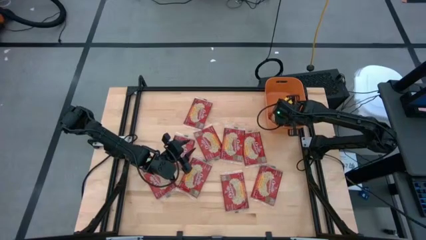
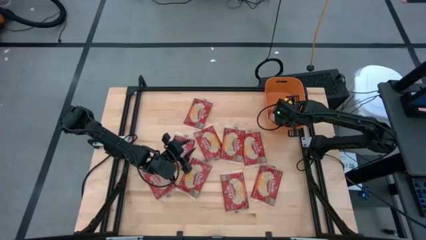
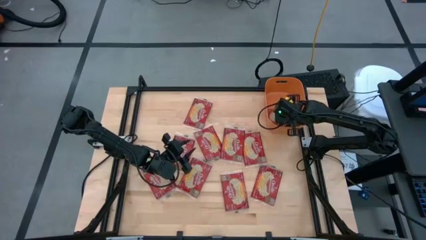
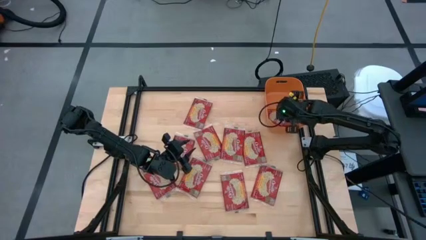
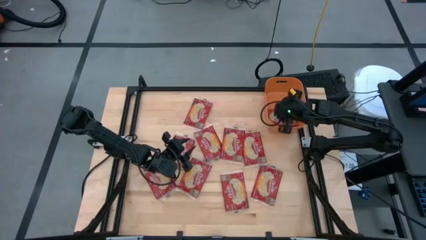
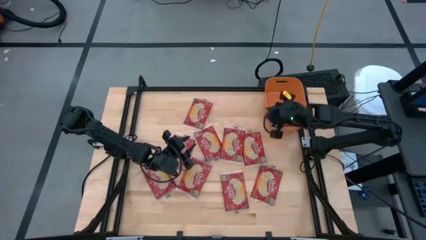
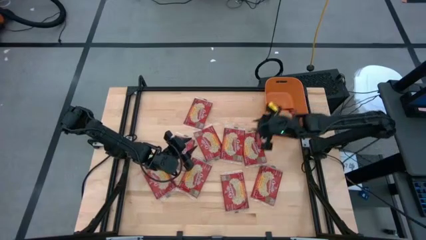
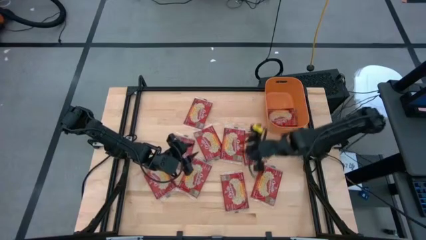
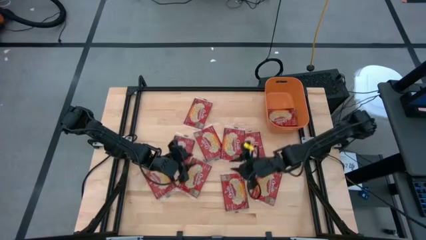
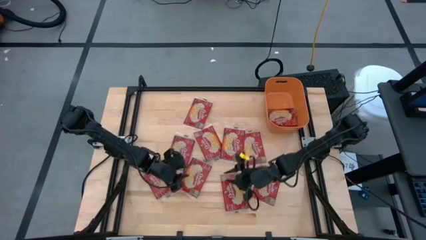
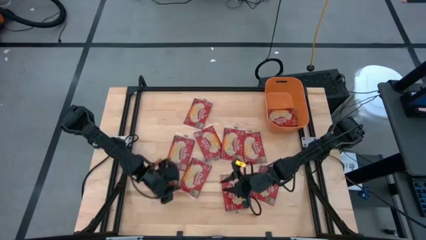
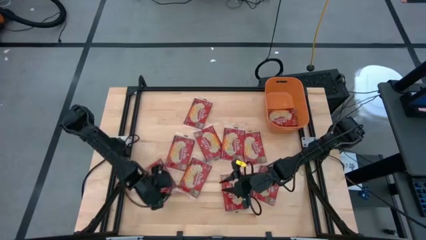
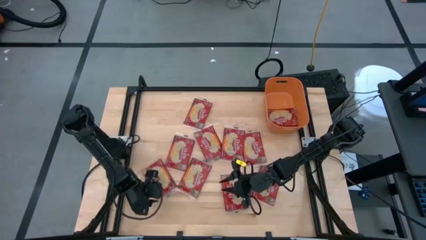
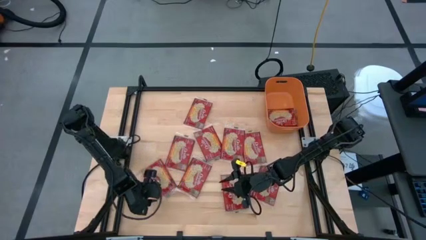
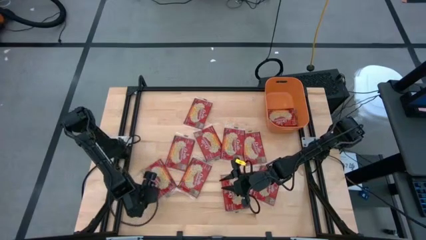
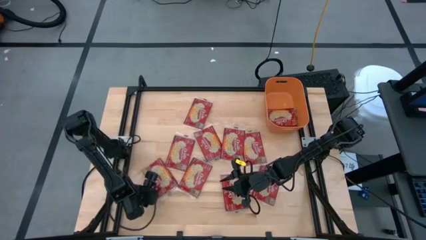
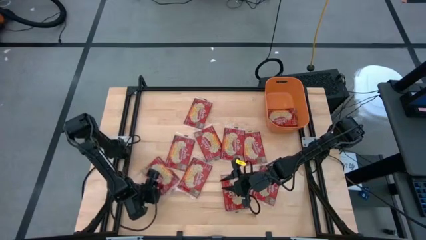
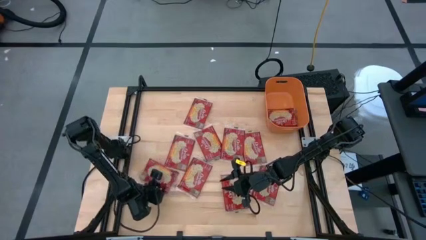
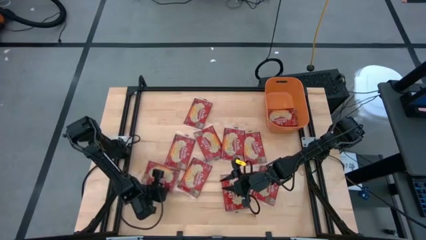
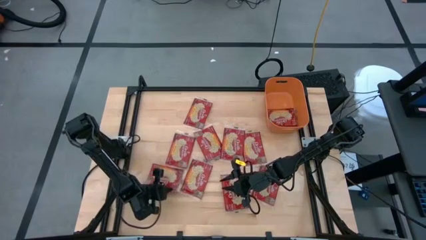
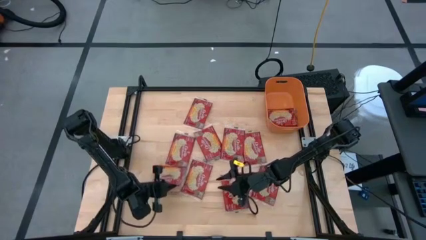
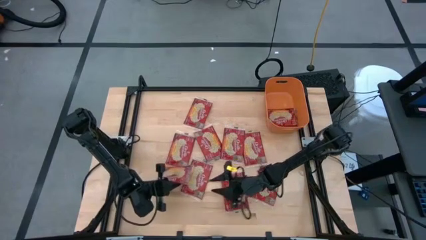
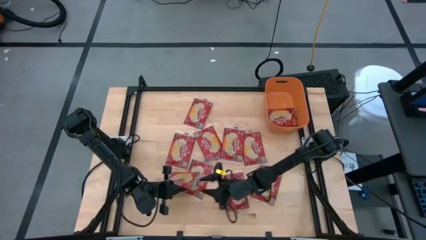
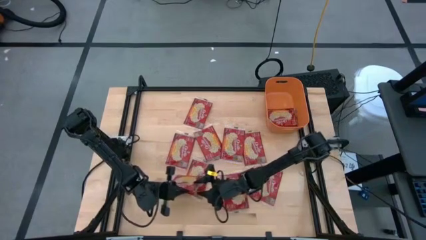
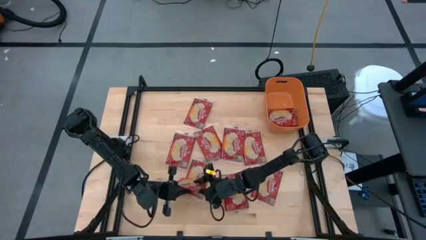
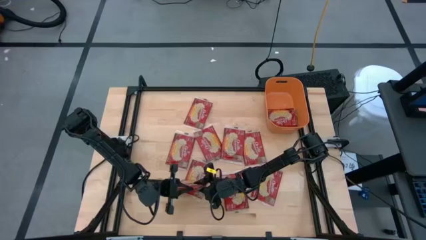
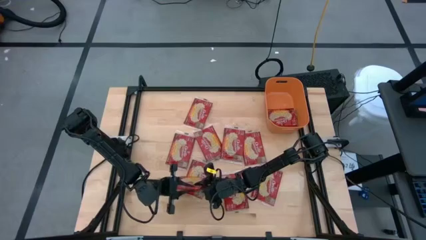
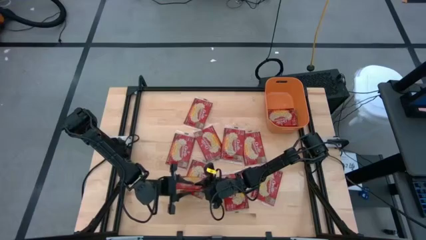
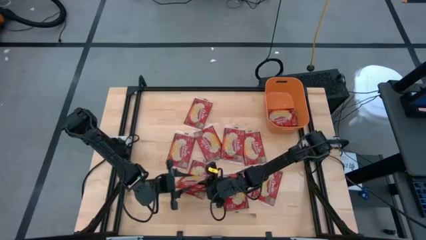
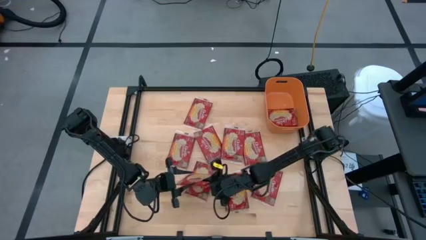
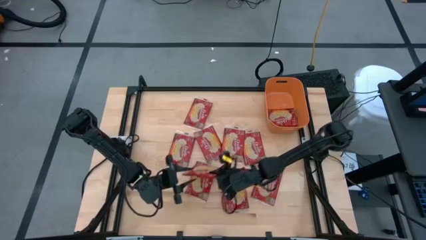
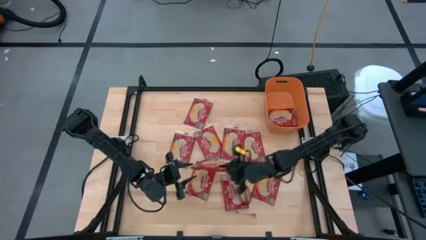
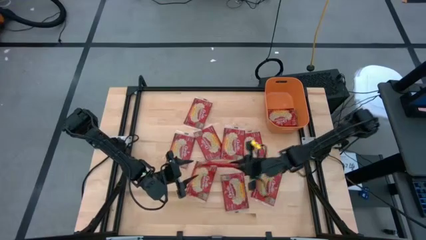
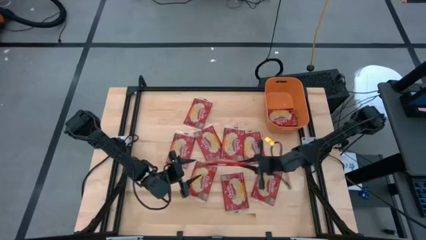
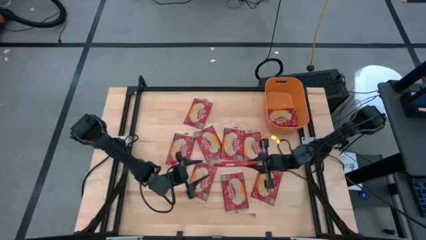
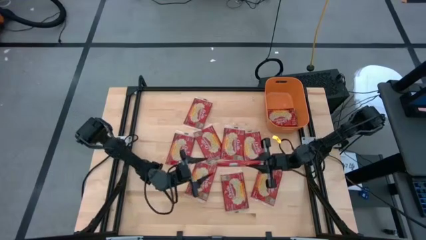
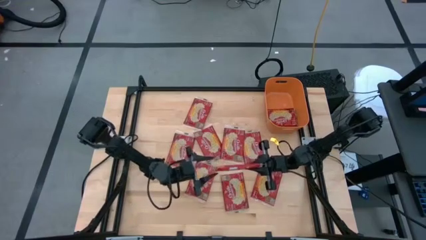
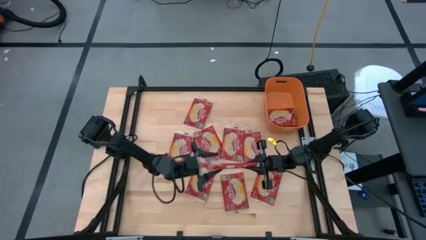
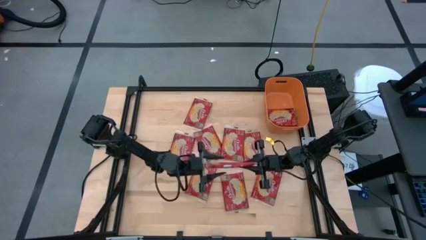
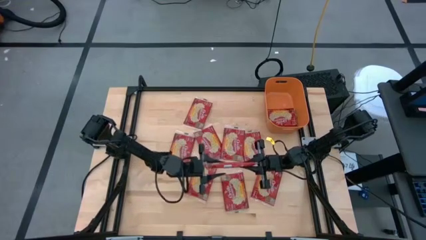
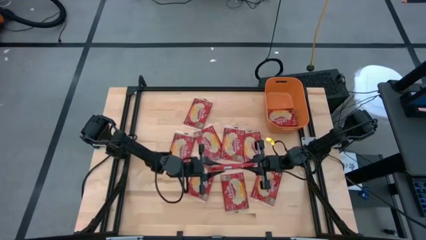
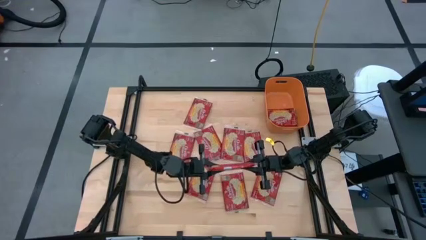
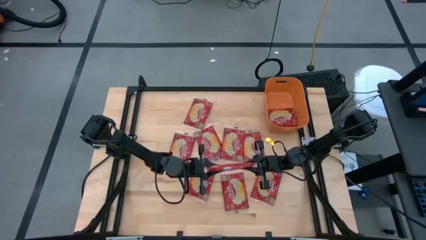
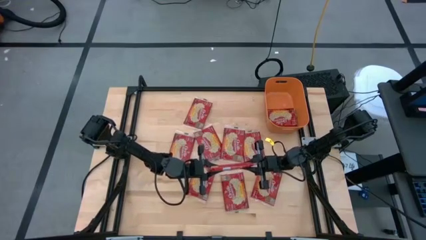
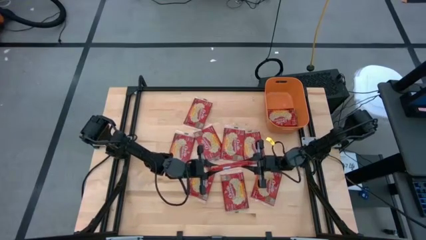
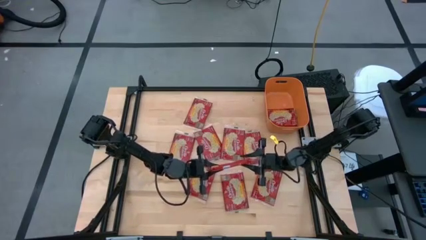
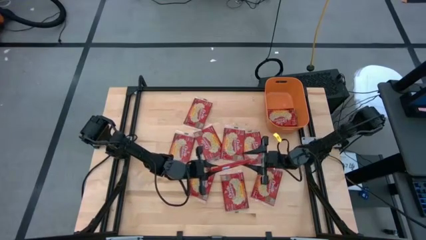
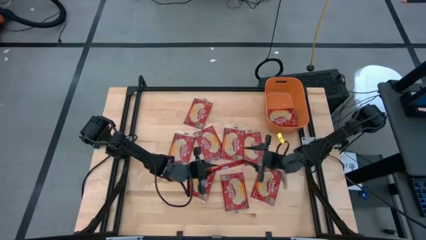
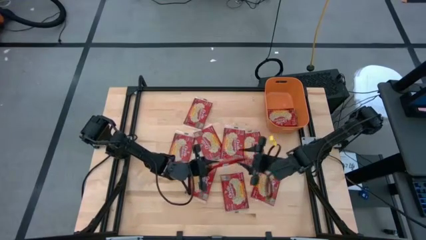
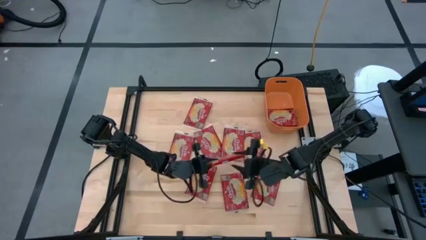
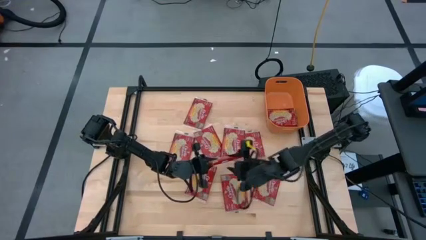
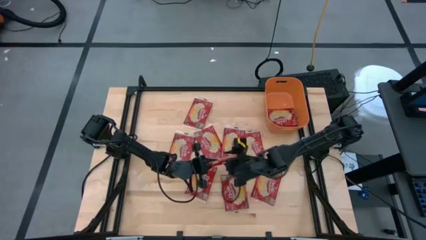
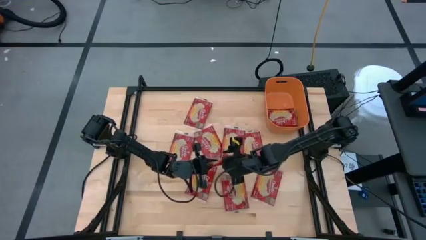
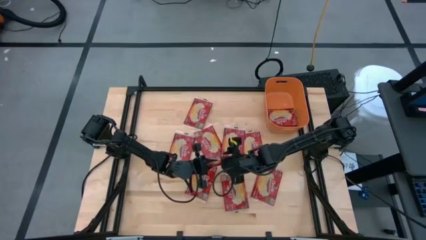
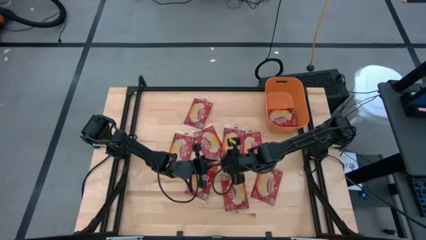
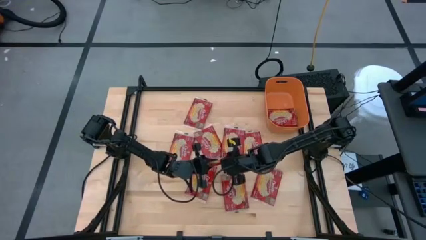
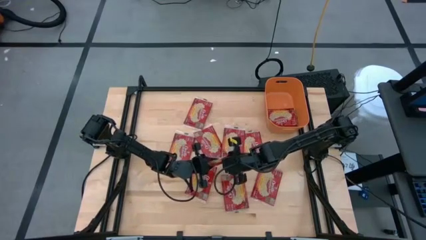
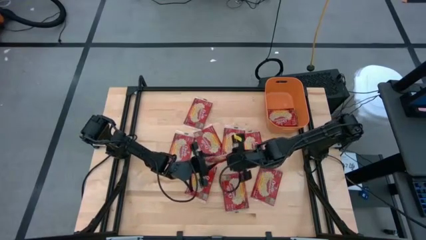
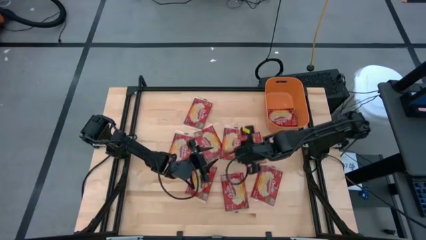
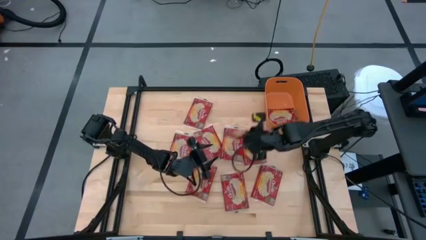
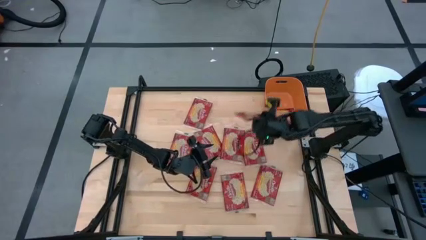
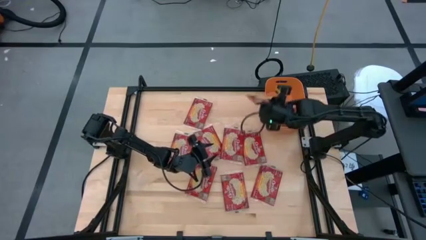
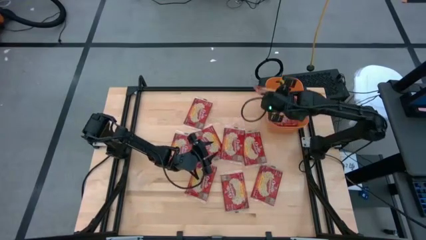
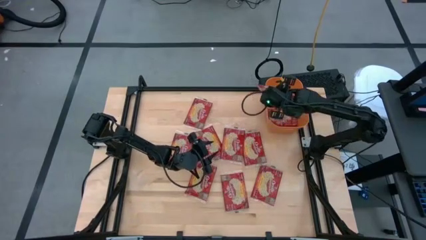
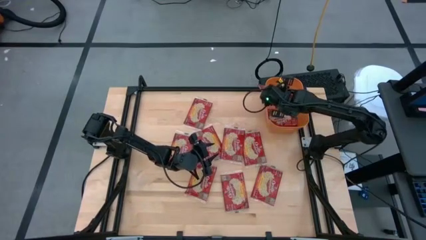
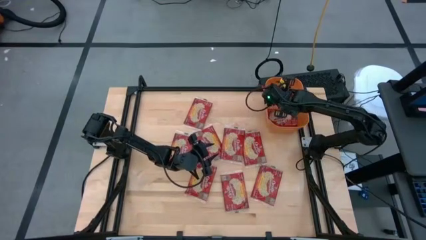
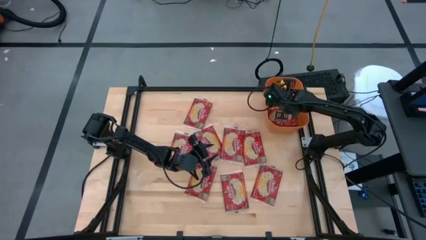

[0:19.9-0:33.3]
Task: Sort popcorn bags into baskets
Put the red popcorn bag into the orange container
